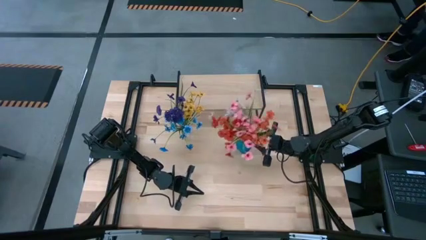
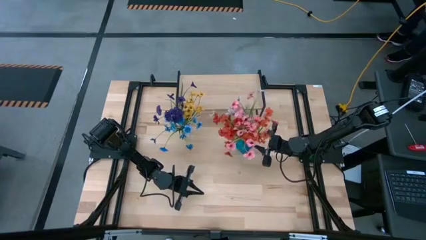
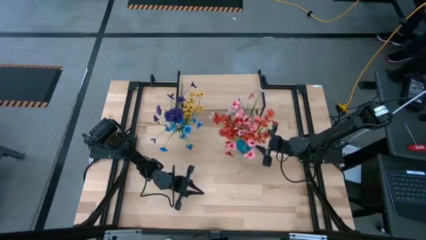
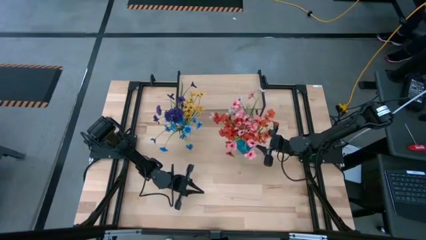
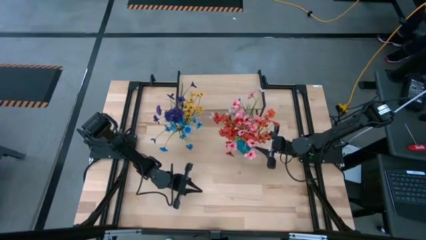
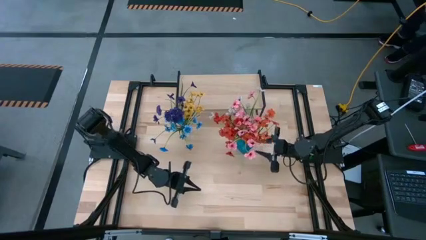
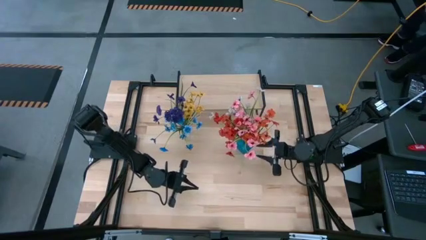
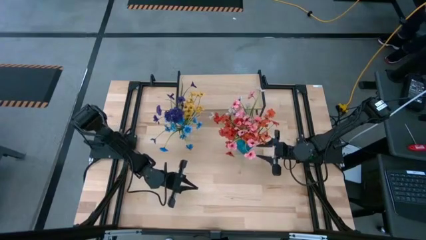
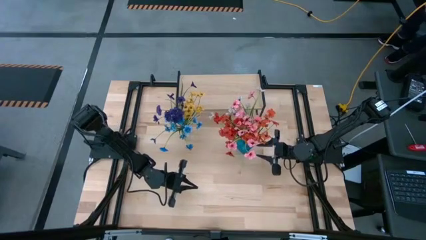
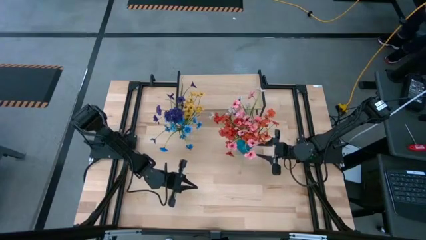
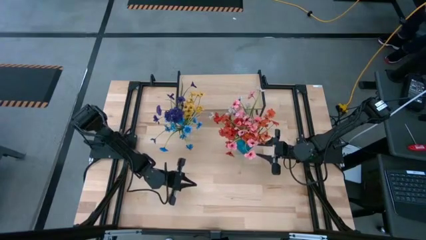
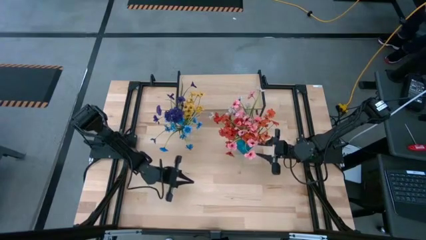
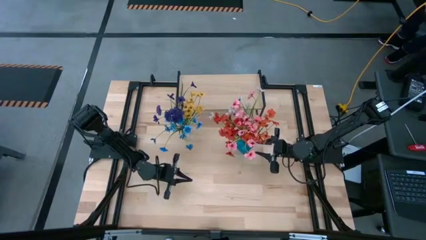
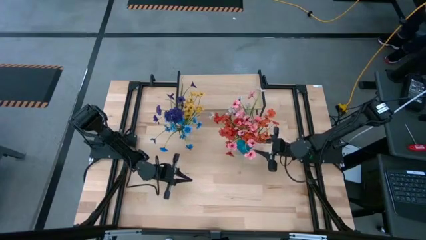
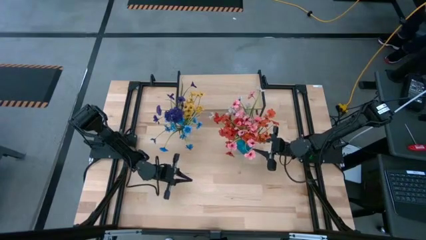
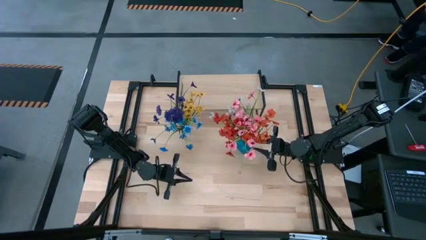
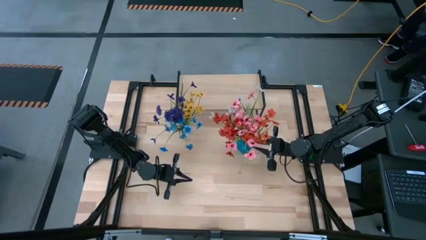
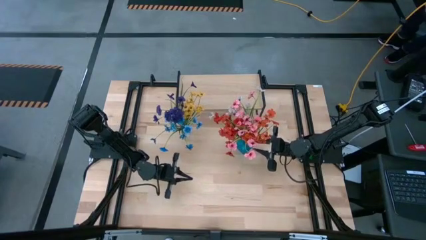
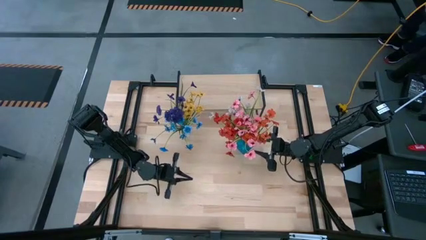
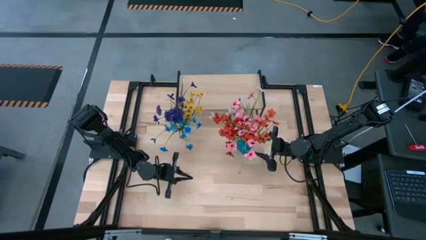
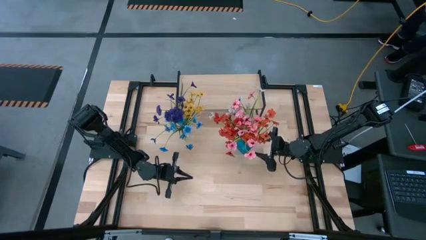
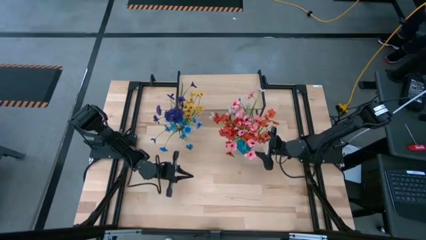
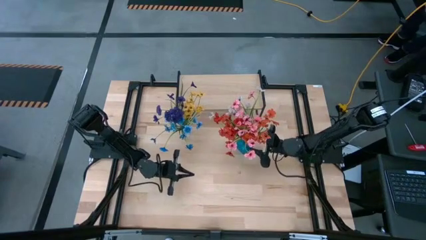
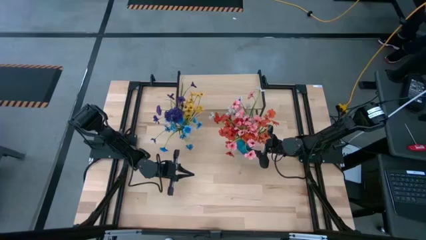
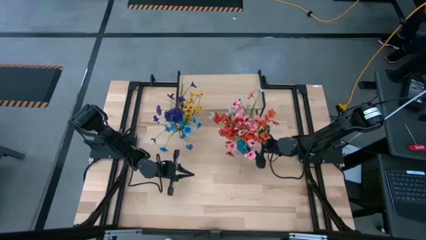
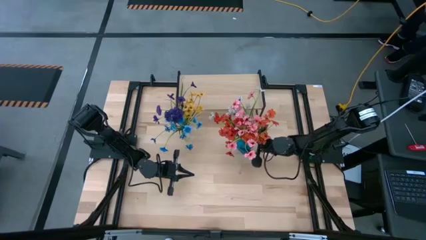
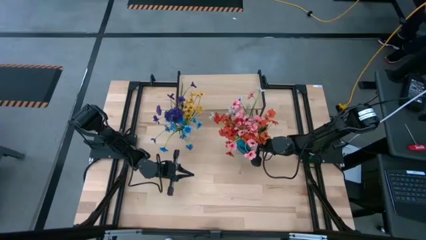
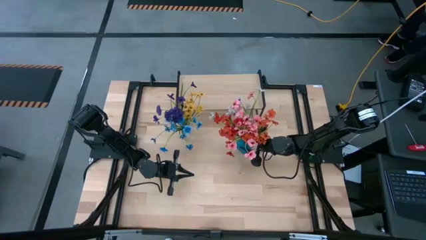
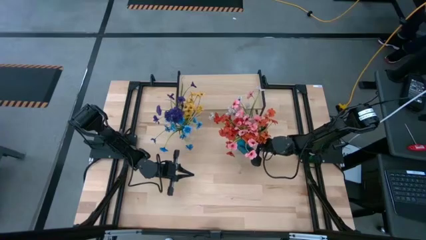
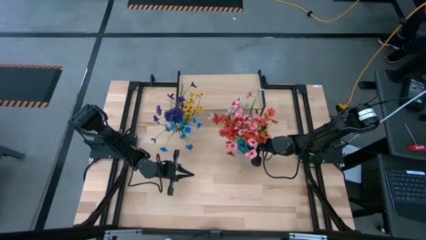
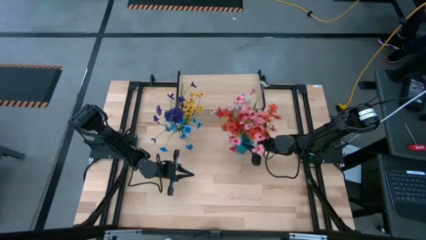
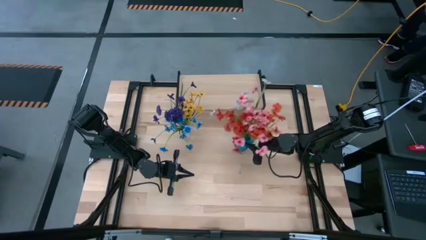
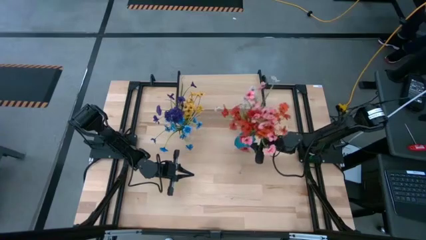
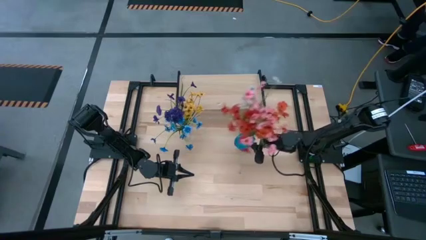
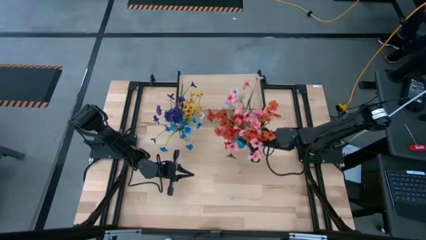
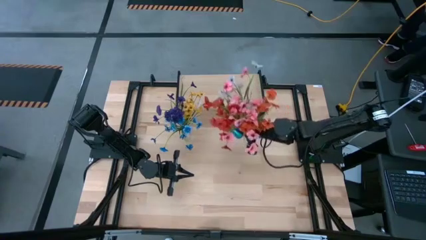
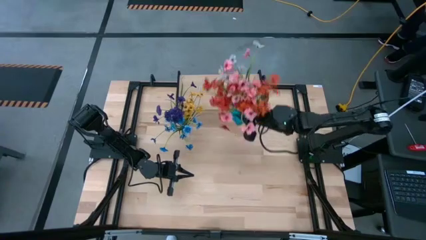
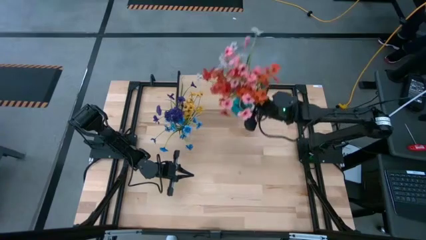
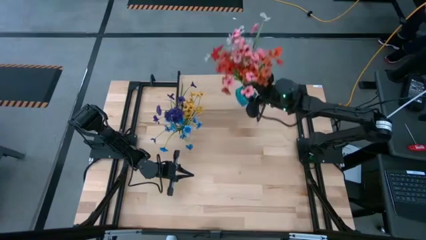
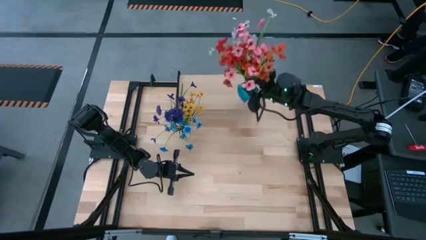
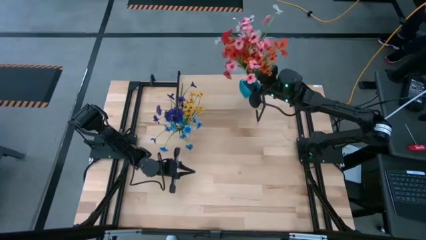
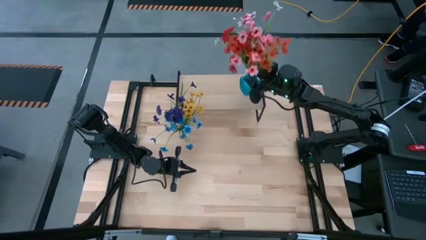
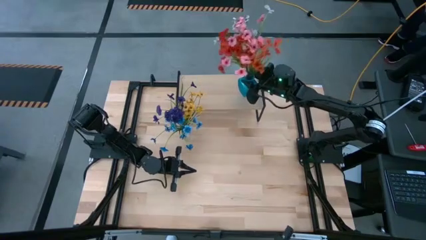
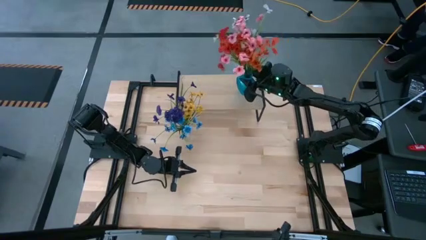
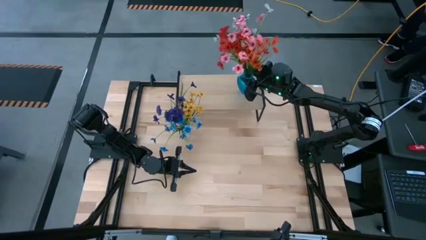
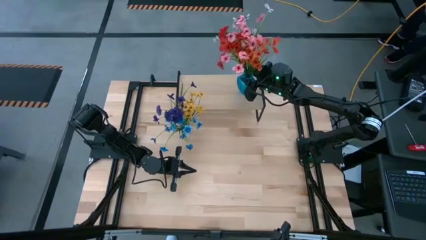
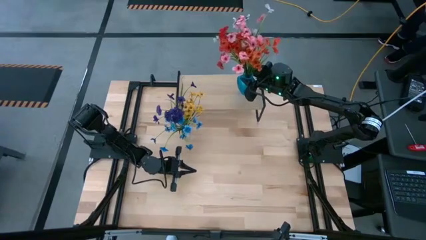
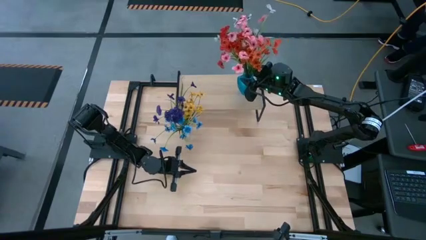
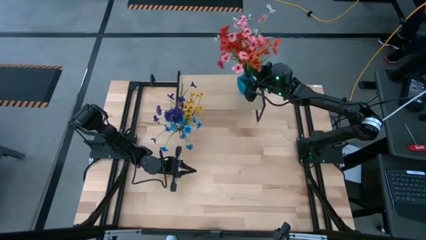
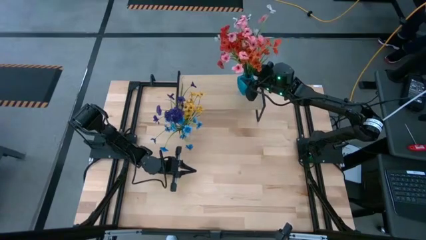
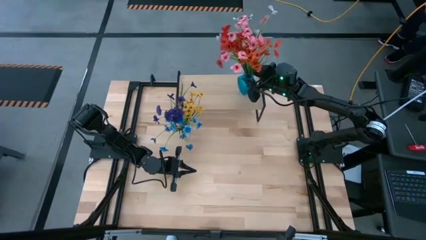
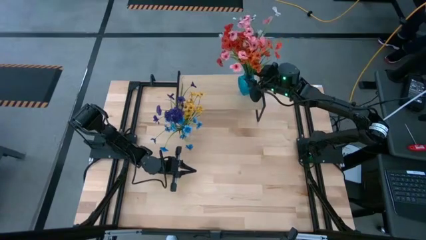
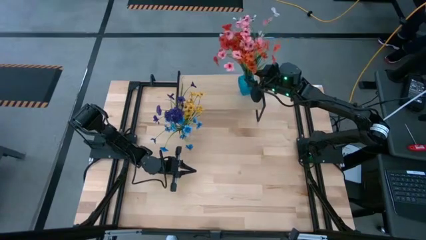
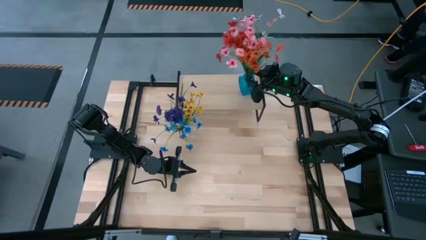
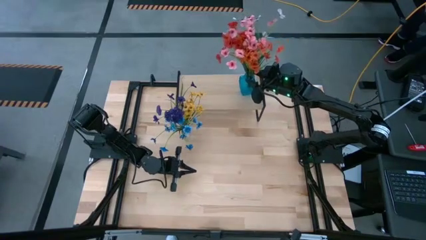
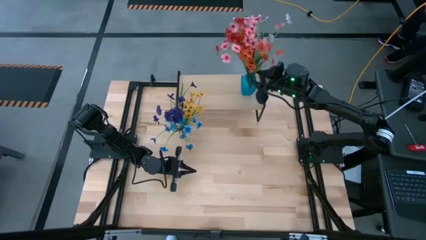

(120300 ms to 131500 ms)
Task: Pick and place flowers into a vace then onto a shelf
Put the blue vase on the shelf
